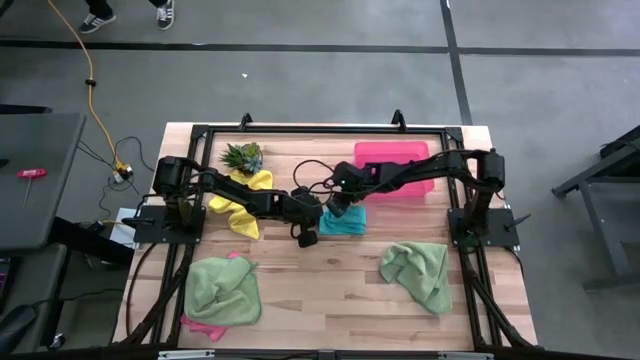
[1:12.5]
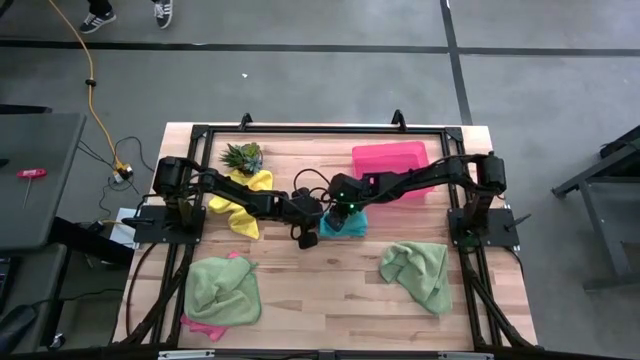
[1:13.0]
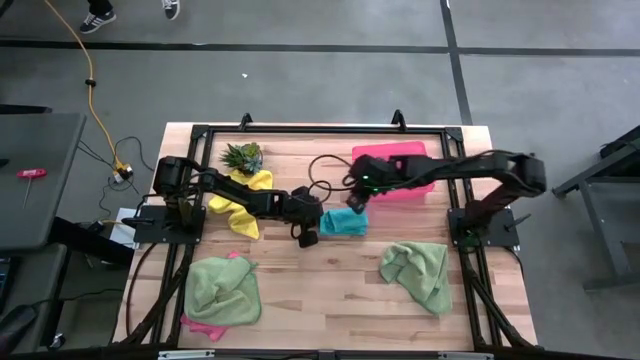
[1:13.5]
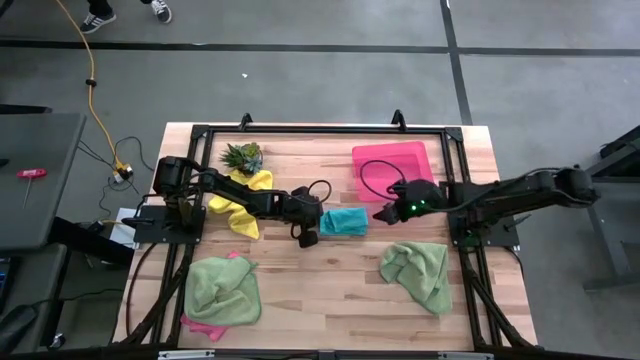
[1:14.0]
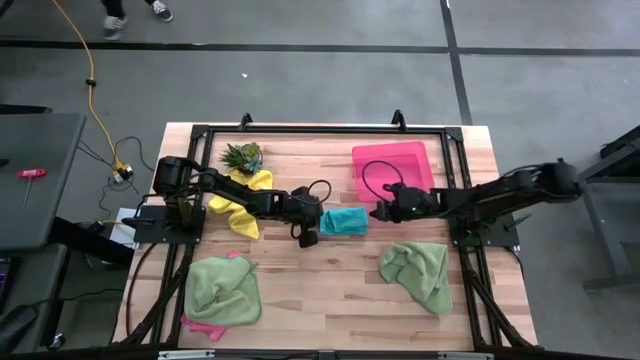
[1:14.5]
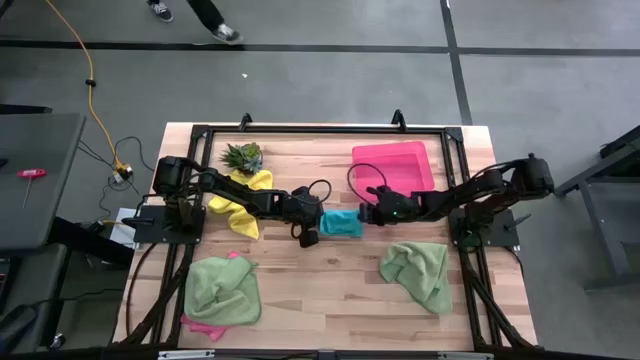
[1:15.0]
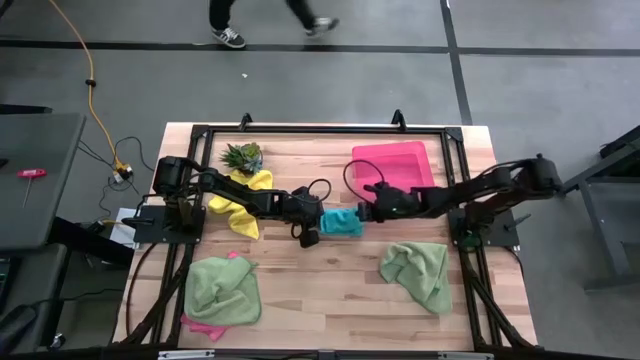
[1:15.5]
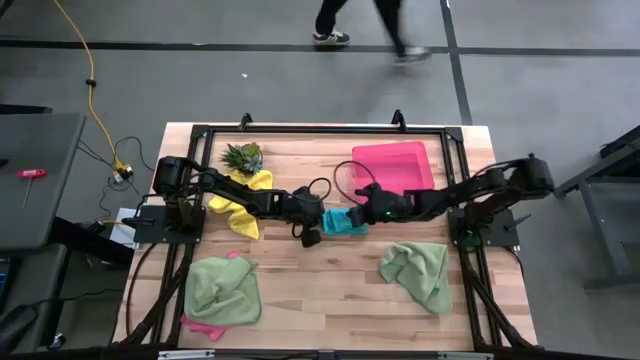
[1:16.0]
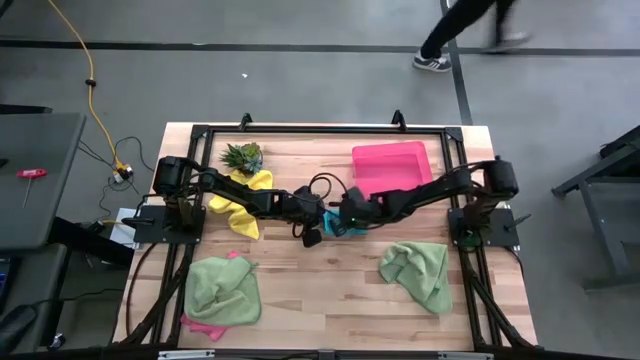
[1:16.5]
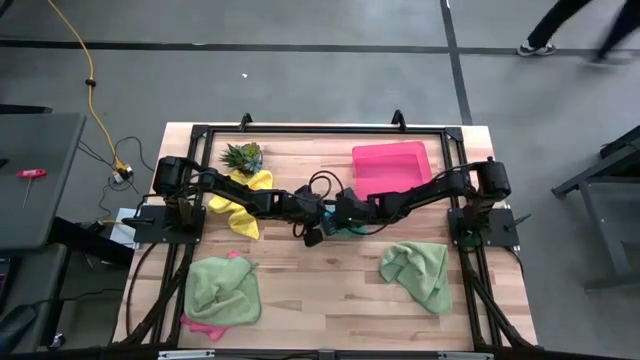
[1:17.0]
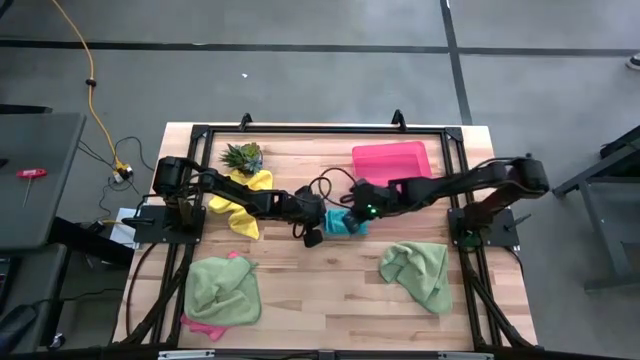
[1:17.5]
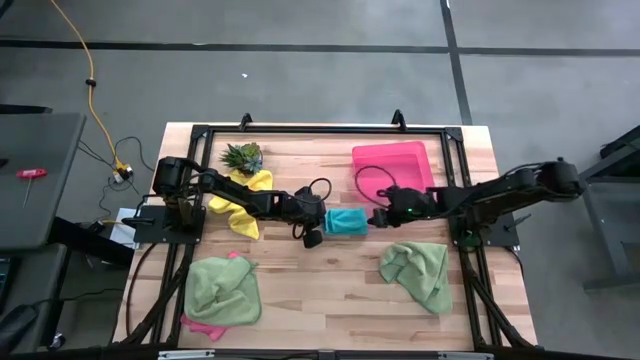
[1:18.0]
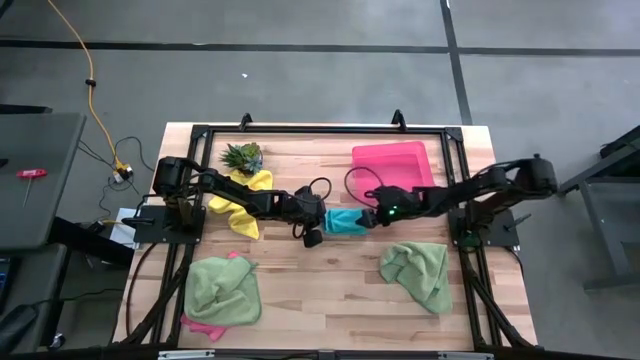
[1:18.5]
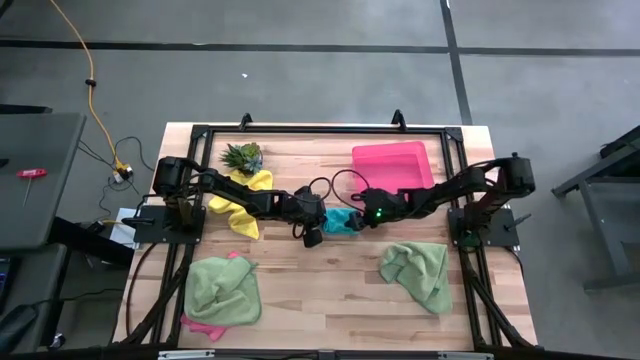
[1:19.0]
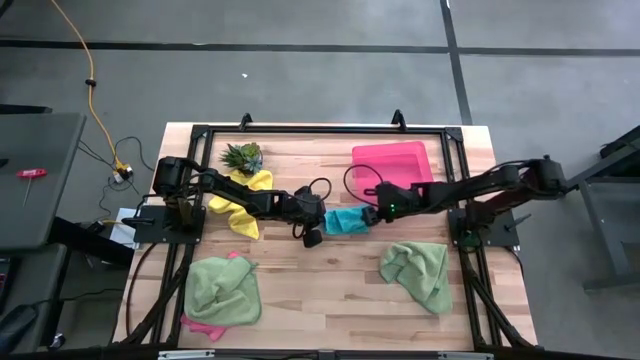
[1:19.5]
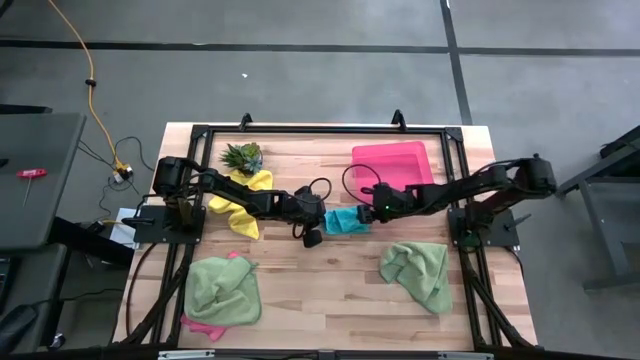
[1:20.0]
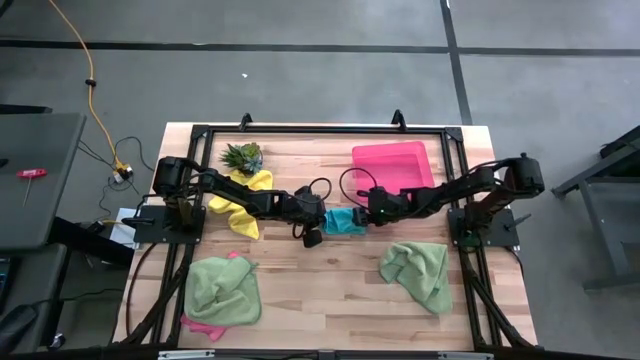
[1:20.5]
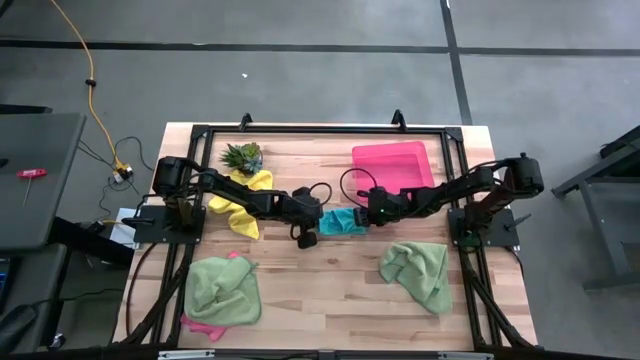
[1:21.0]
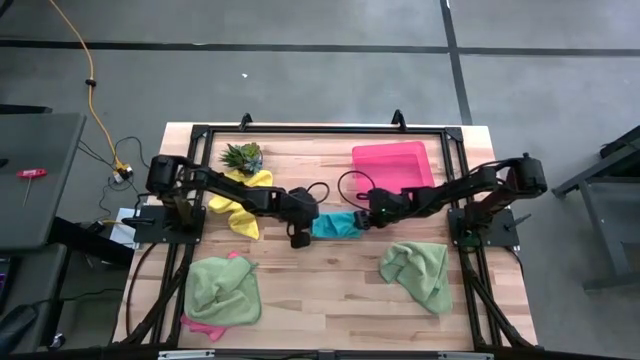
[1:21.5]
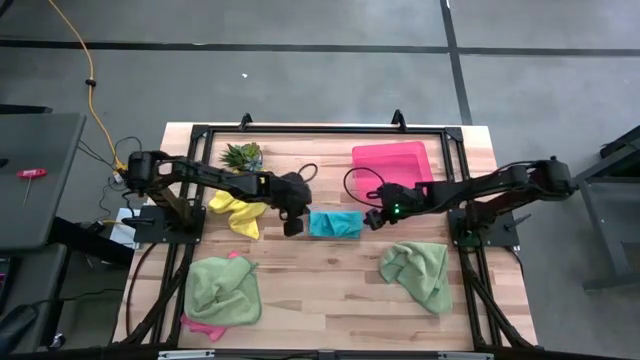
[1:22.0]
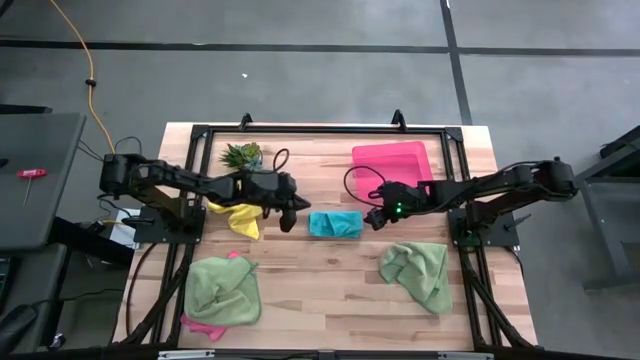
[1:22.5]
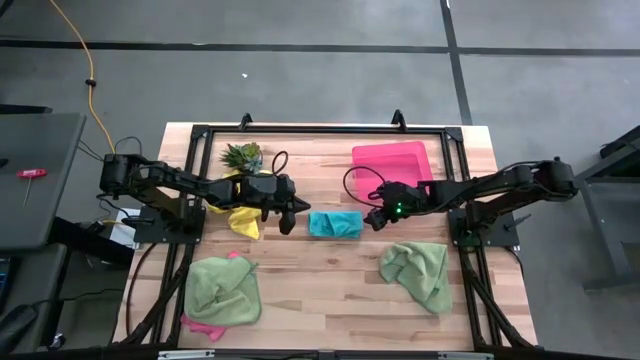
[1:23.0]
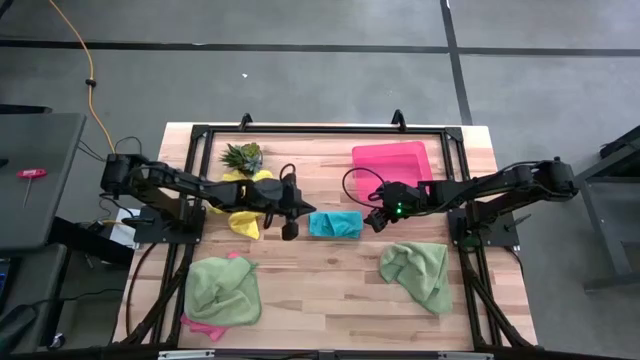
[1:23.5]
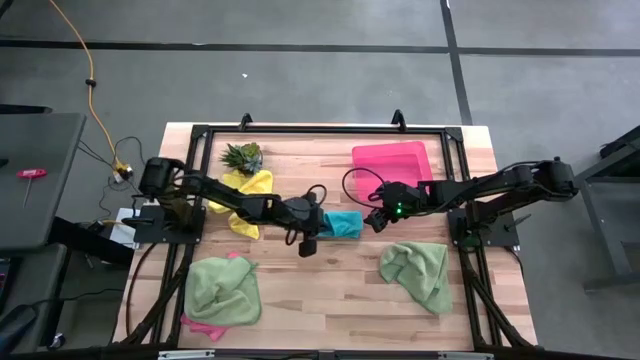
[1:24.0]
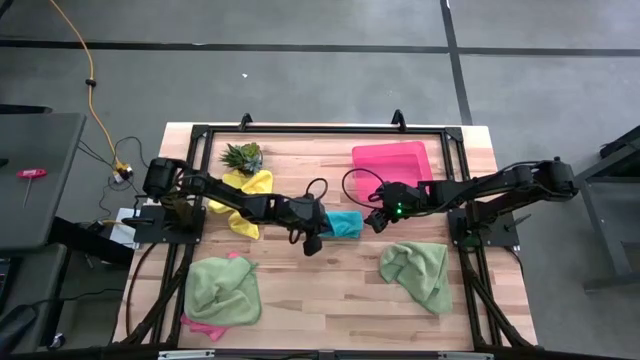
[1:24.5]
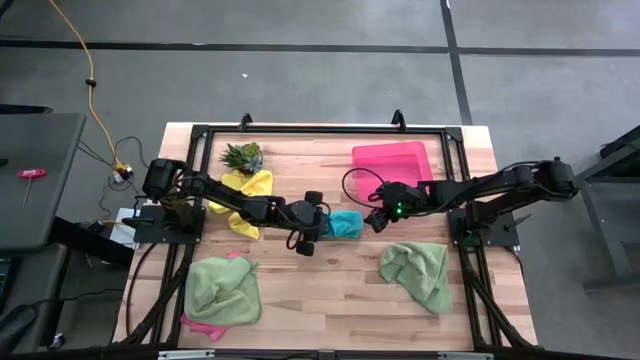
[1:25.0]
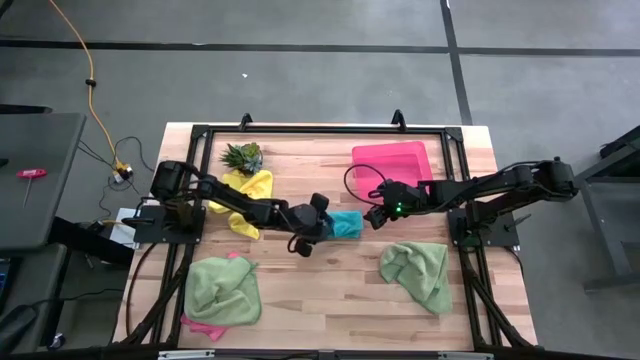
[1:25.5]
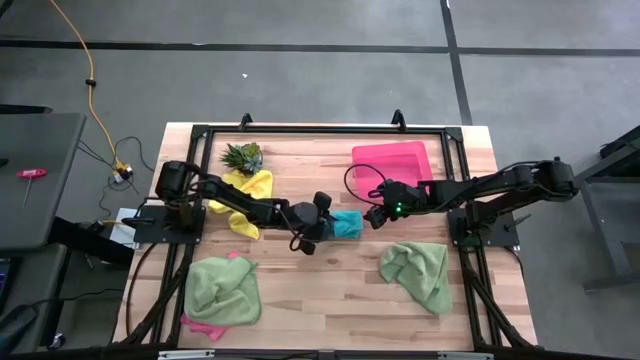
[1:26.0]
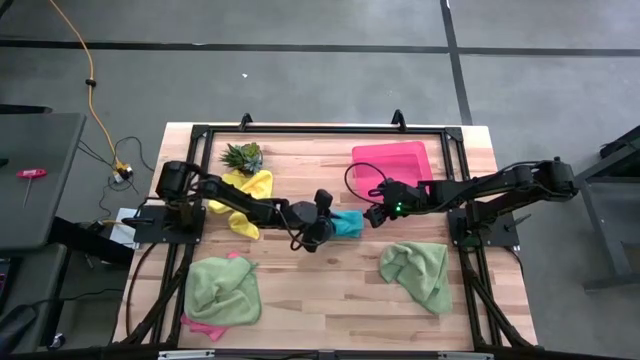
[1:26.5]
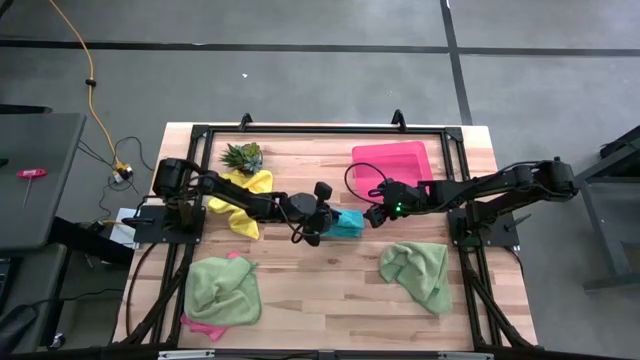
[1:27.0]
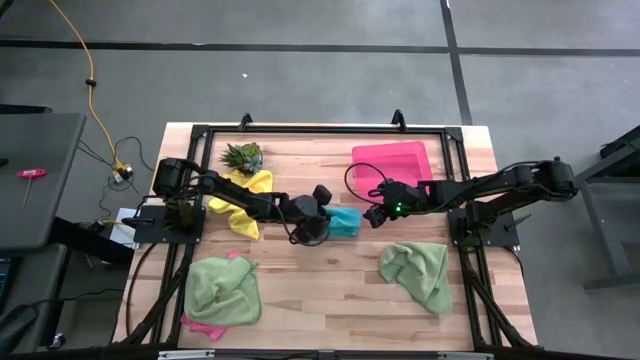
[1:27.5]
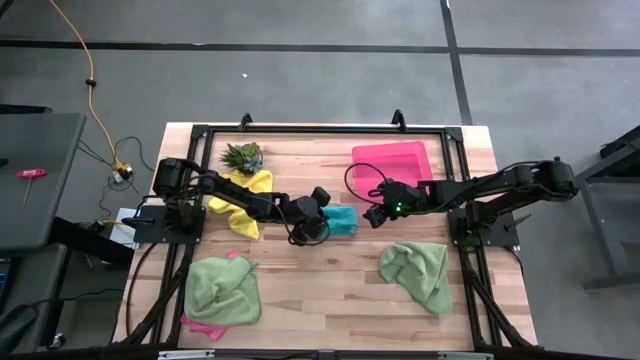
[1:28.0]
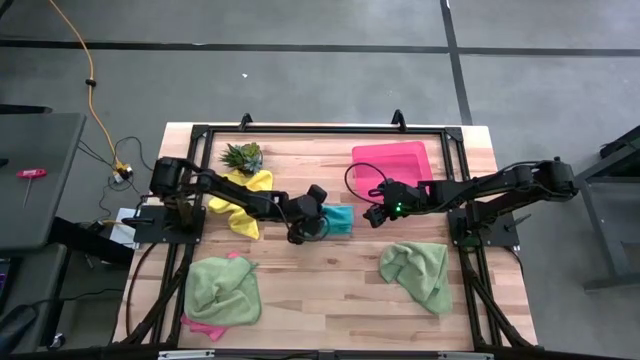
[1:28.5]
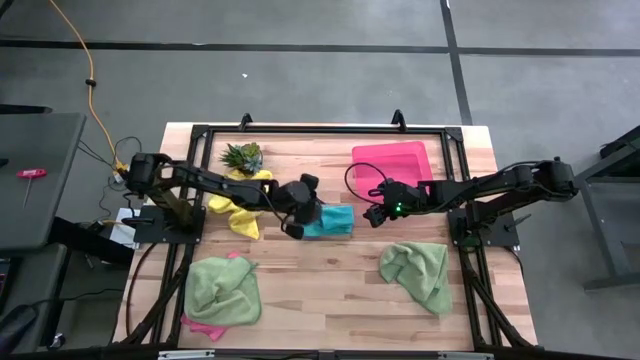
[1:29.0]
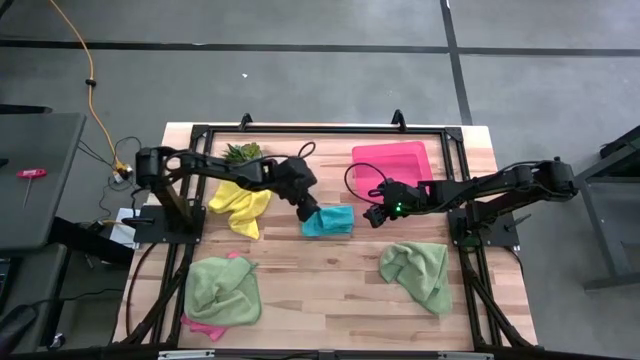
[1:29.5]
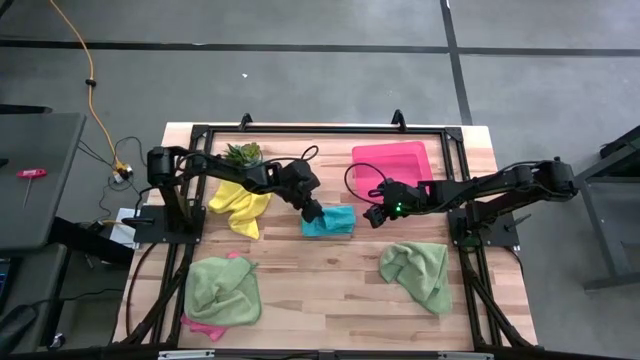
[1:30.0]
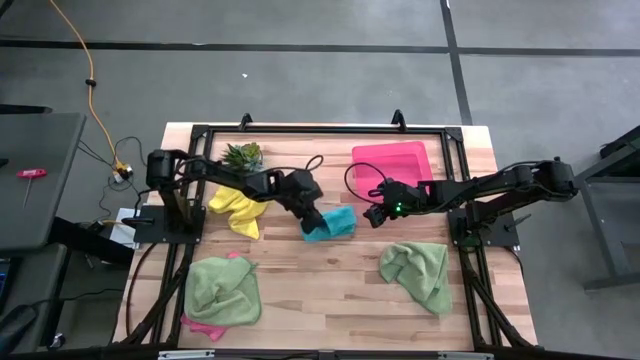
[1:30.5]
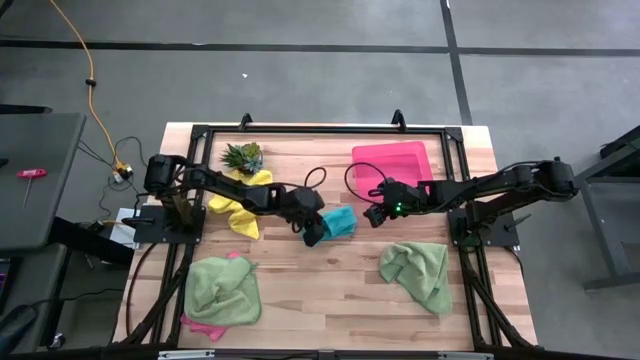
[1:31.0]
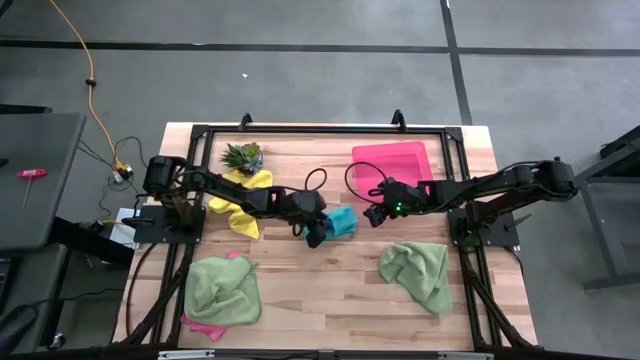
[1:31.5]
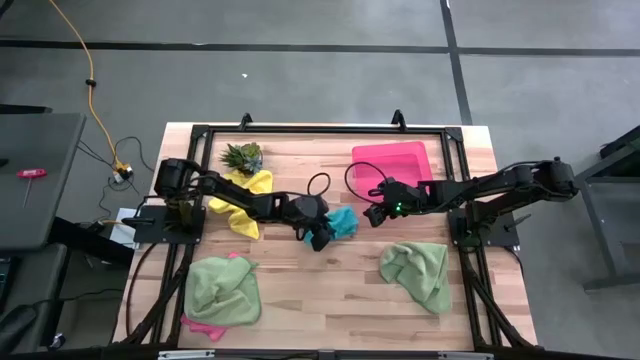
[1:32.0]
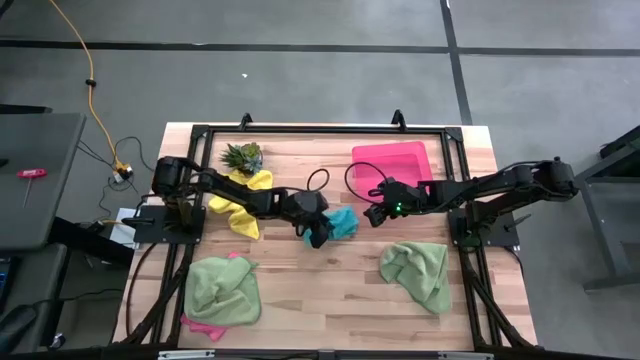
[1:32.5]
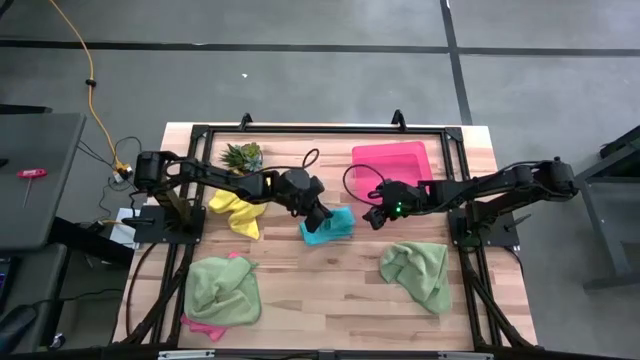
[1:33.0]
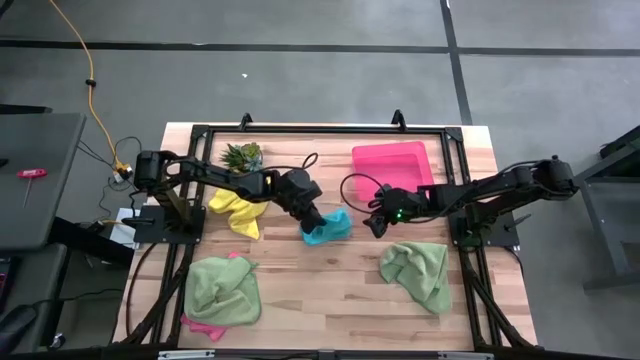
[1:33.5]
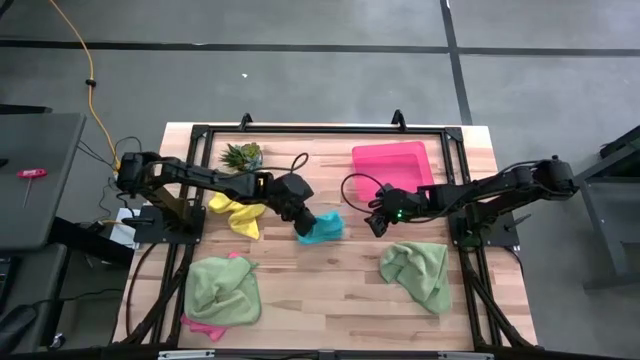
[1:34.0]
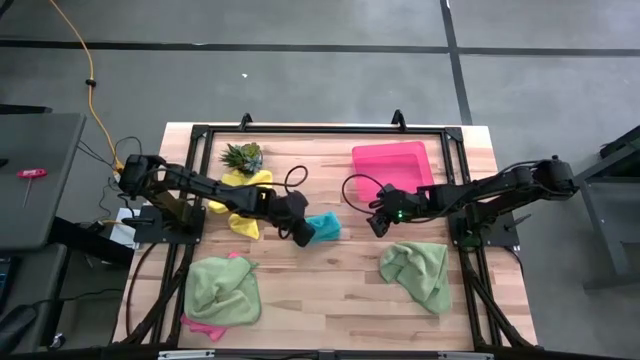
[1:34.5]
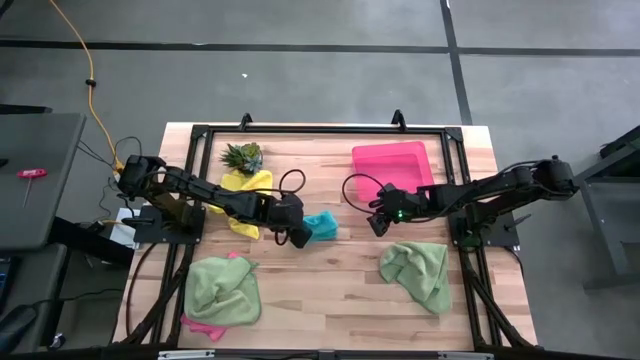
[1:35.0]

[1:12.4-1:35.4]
Task: Fold microfiber towels
Fold the blue microfiber cloth
